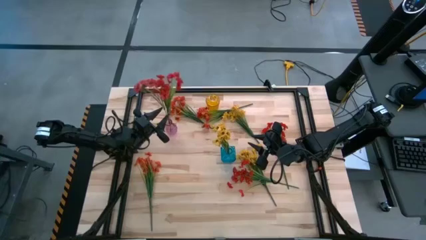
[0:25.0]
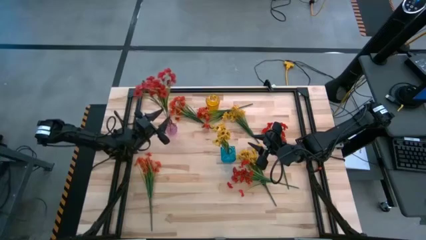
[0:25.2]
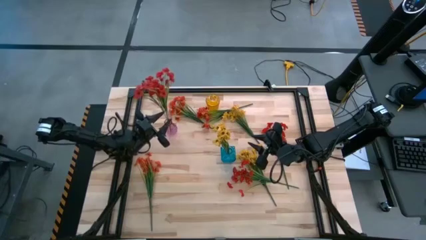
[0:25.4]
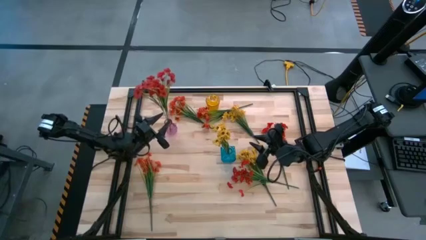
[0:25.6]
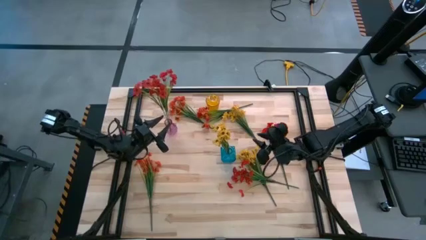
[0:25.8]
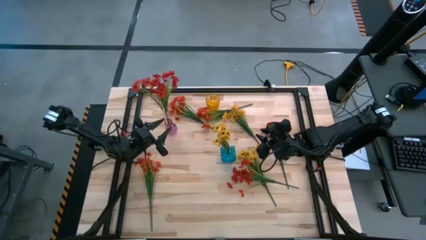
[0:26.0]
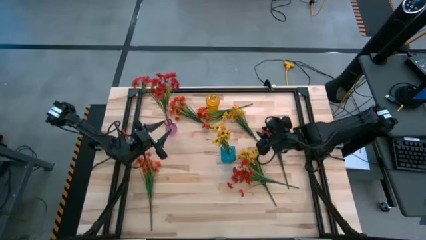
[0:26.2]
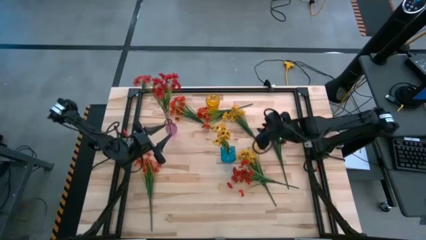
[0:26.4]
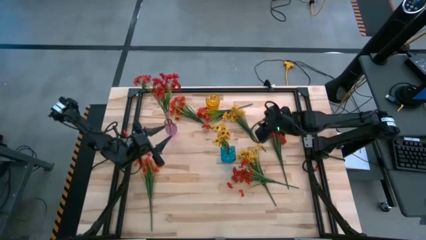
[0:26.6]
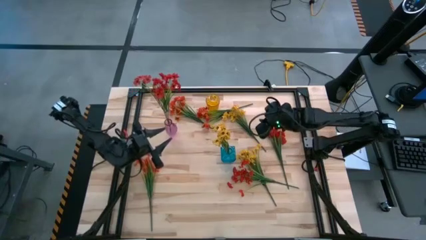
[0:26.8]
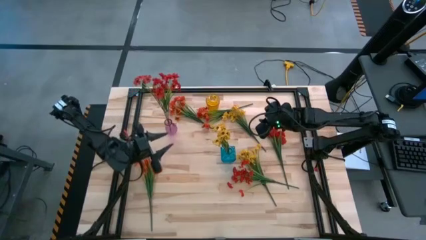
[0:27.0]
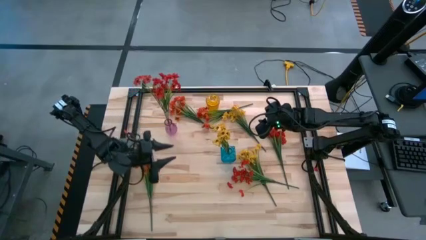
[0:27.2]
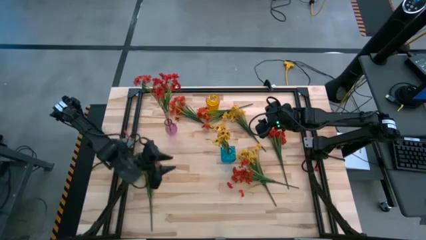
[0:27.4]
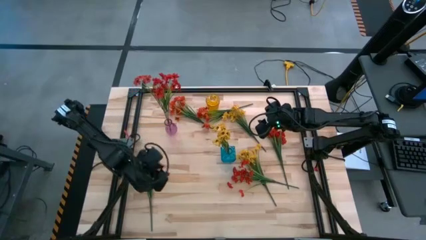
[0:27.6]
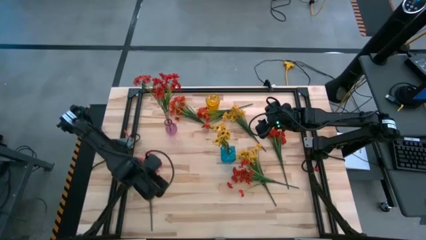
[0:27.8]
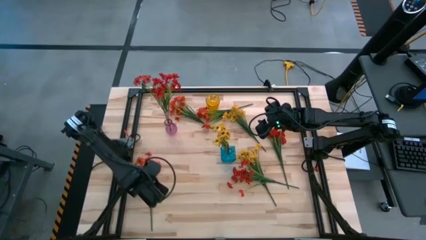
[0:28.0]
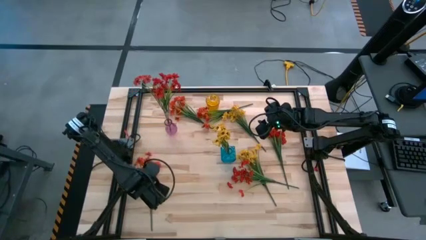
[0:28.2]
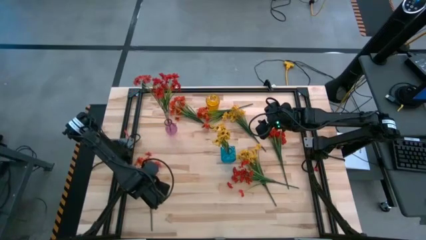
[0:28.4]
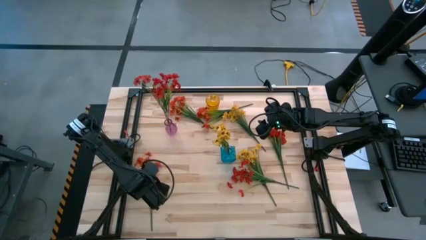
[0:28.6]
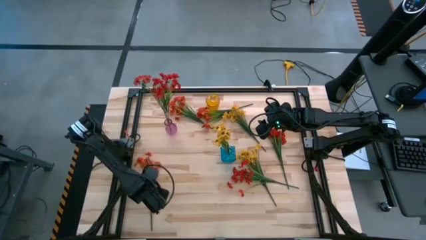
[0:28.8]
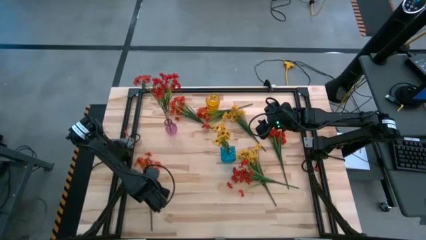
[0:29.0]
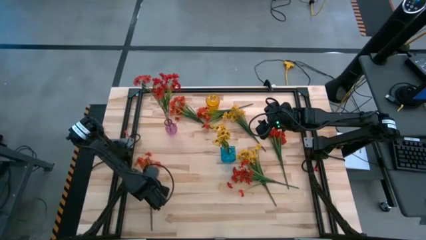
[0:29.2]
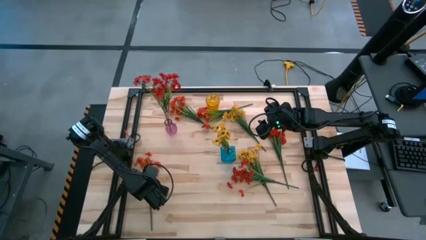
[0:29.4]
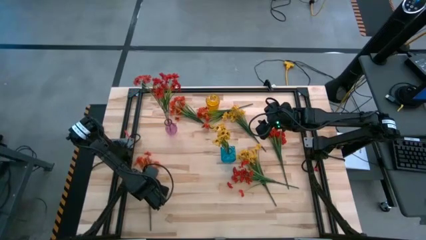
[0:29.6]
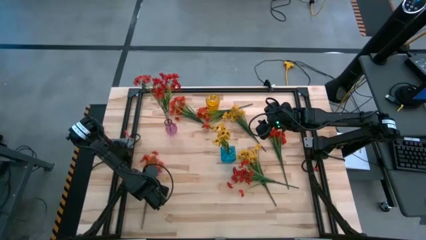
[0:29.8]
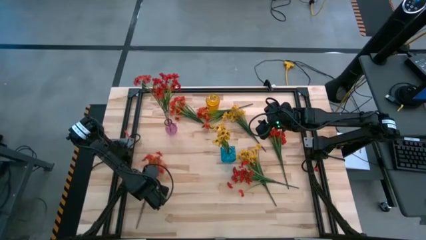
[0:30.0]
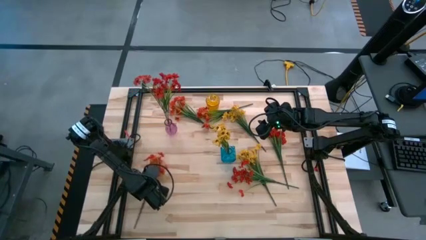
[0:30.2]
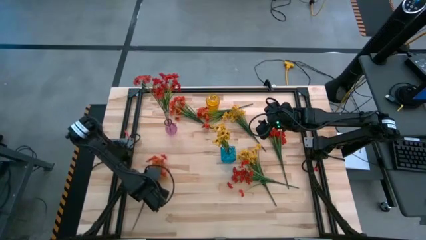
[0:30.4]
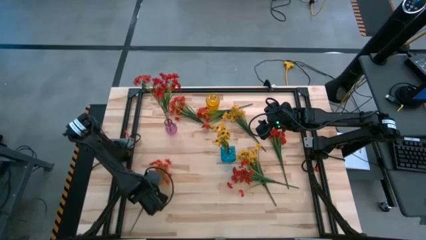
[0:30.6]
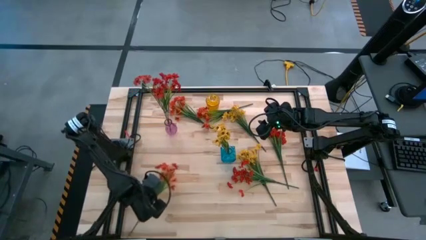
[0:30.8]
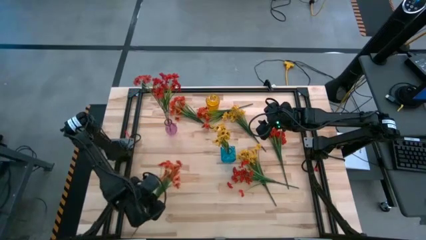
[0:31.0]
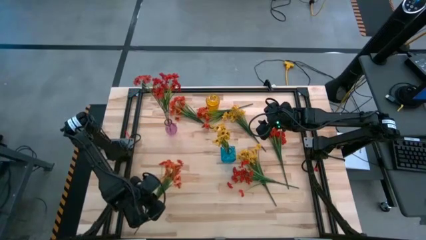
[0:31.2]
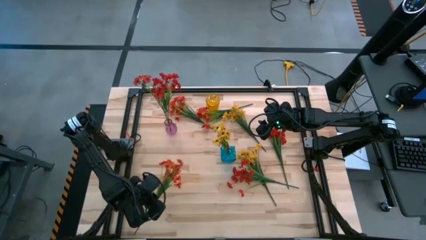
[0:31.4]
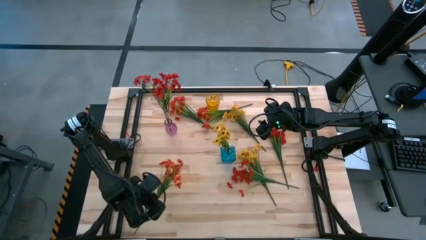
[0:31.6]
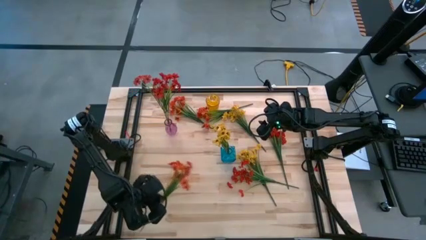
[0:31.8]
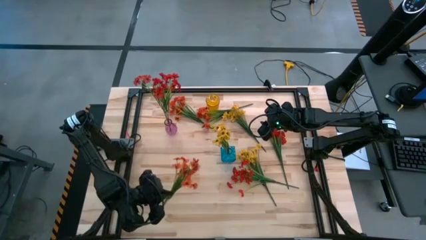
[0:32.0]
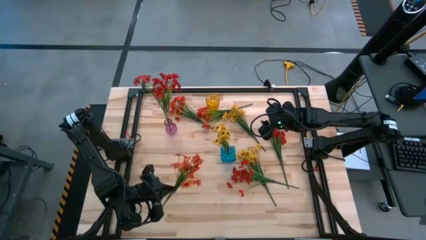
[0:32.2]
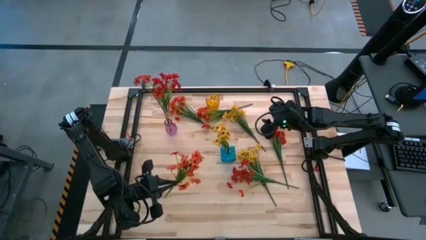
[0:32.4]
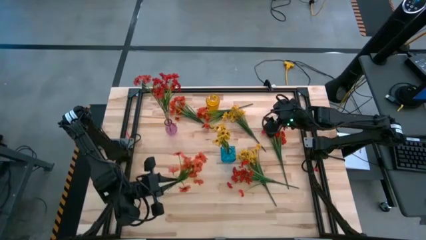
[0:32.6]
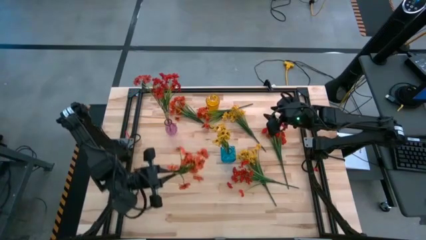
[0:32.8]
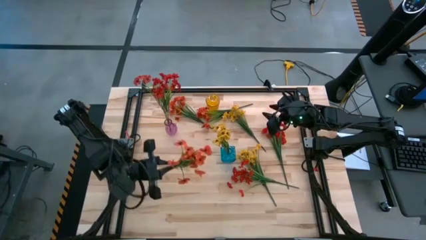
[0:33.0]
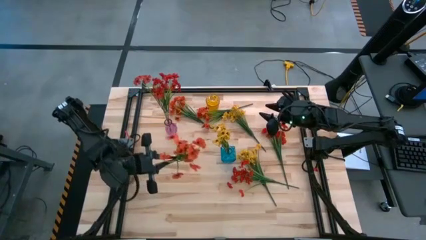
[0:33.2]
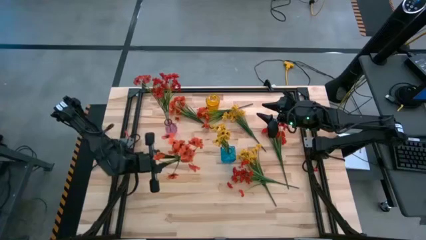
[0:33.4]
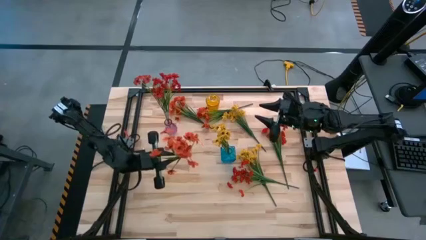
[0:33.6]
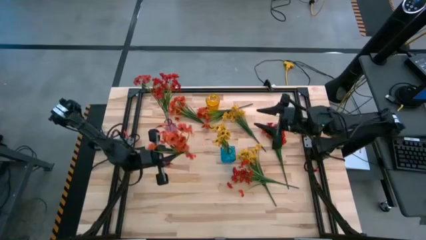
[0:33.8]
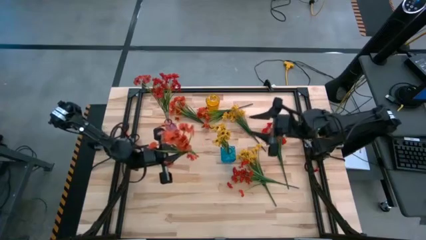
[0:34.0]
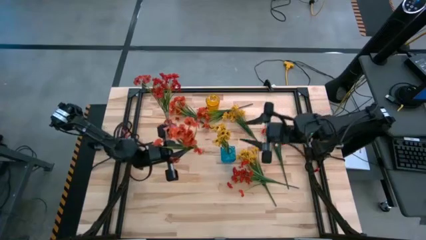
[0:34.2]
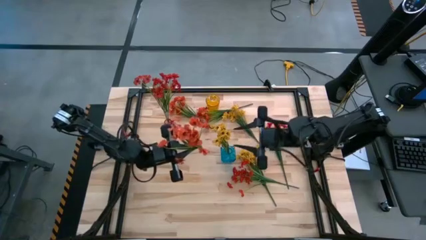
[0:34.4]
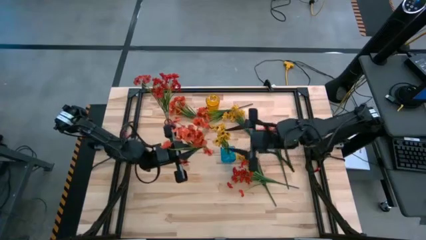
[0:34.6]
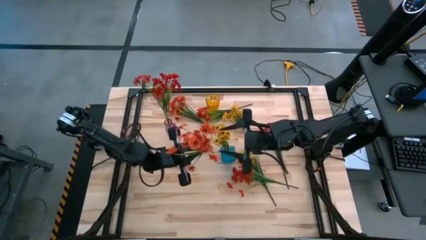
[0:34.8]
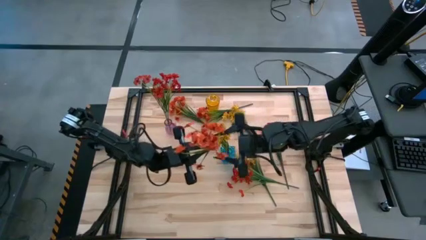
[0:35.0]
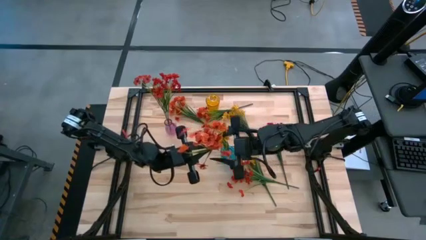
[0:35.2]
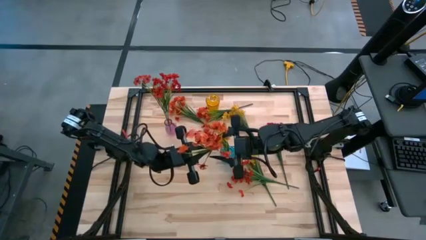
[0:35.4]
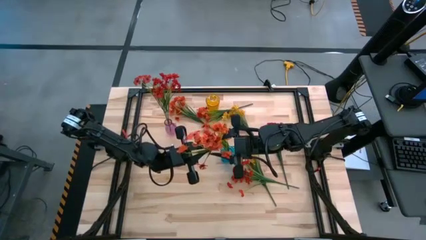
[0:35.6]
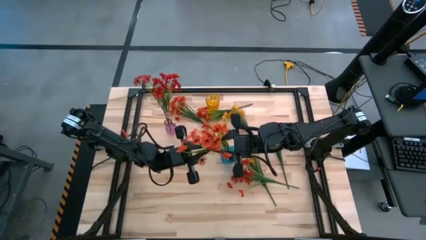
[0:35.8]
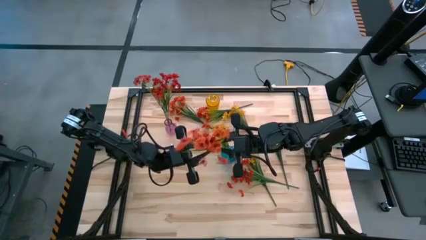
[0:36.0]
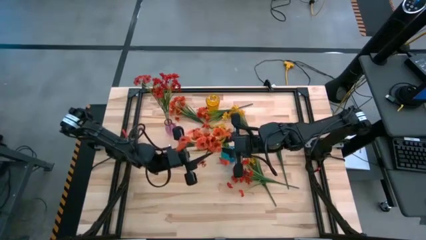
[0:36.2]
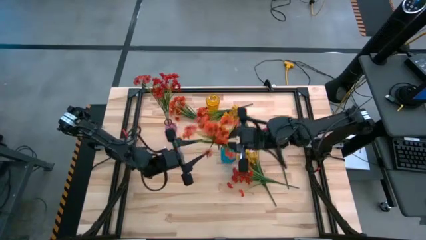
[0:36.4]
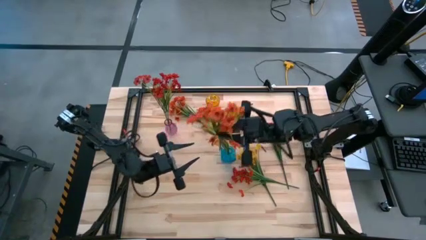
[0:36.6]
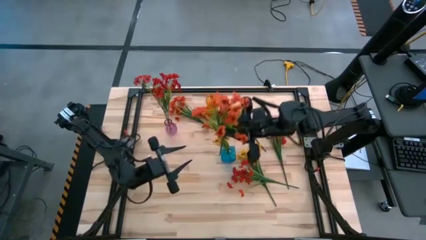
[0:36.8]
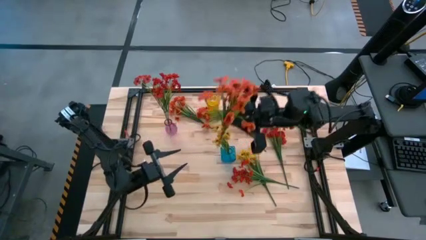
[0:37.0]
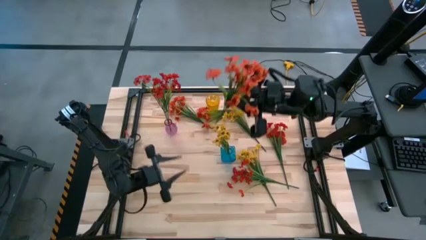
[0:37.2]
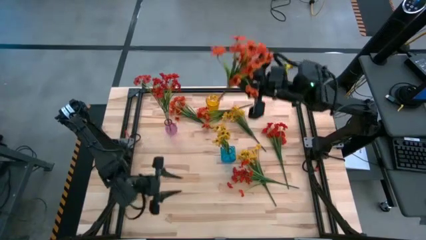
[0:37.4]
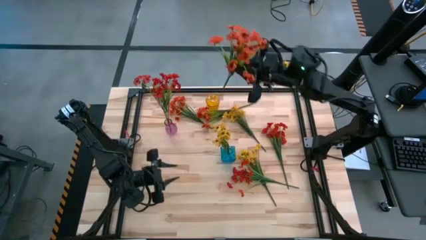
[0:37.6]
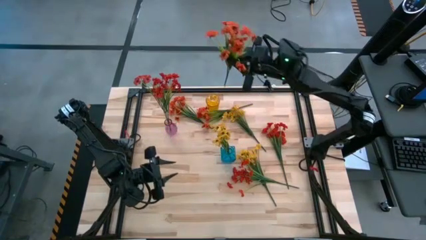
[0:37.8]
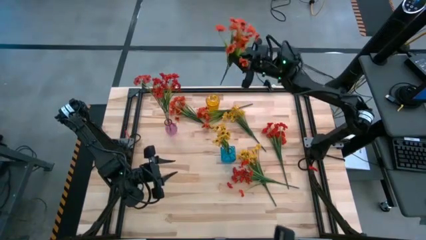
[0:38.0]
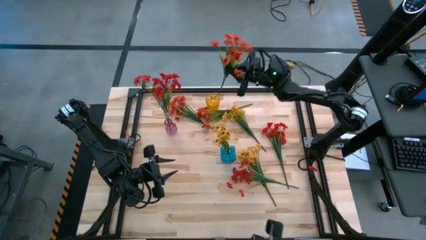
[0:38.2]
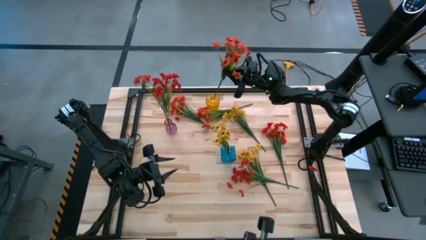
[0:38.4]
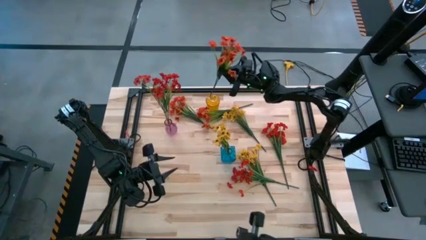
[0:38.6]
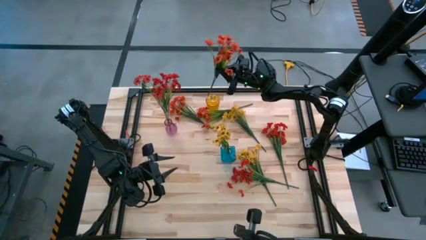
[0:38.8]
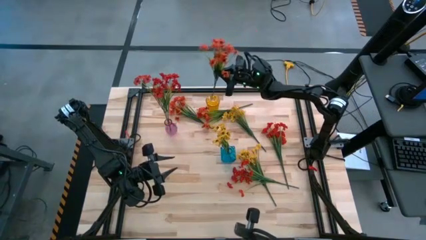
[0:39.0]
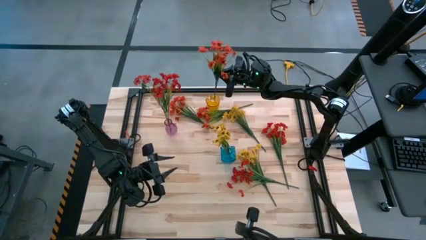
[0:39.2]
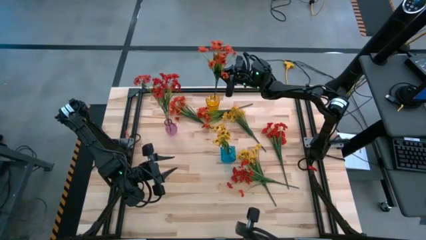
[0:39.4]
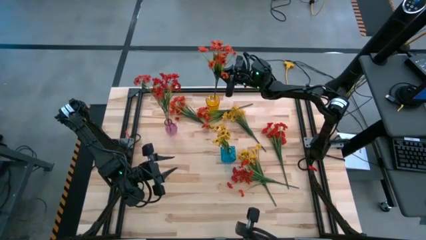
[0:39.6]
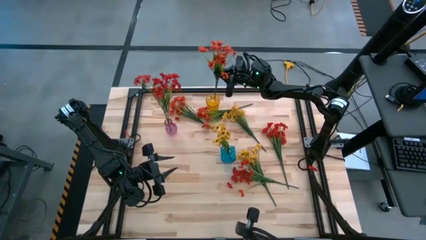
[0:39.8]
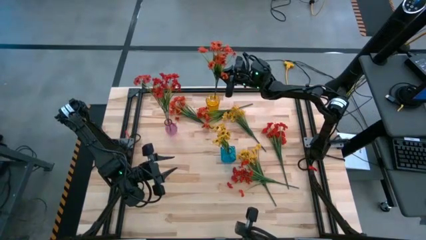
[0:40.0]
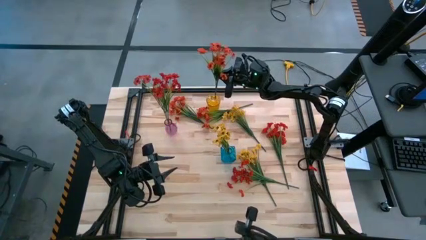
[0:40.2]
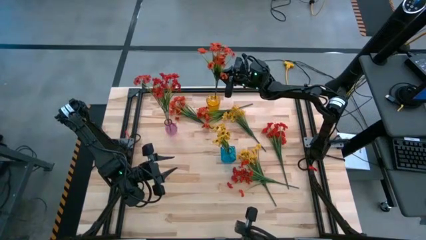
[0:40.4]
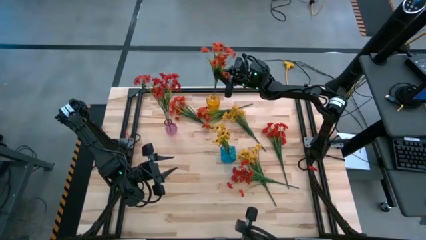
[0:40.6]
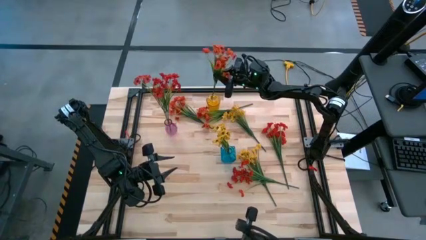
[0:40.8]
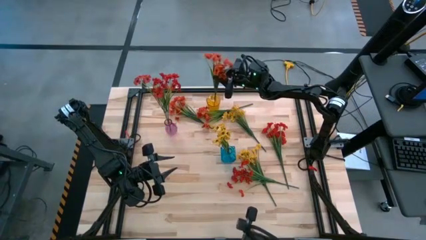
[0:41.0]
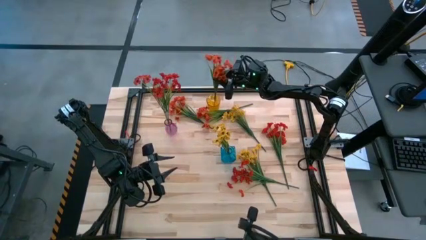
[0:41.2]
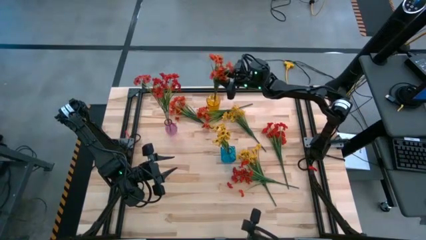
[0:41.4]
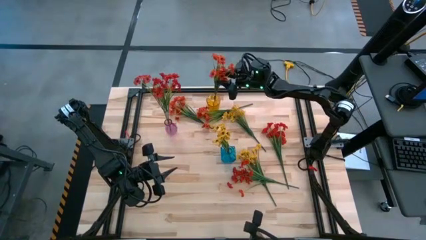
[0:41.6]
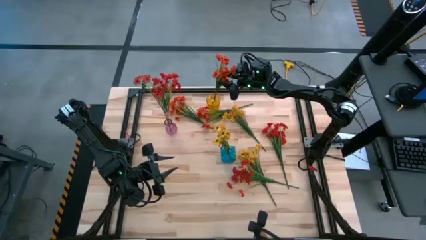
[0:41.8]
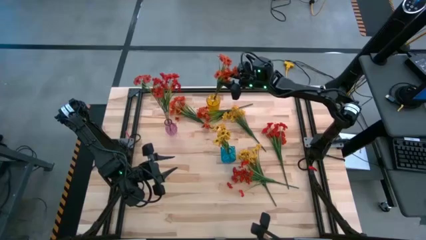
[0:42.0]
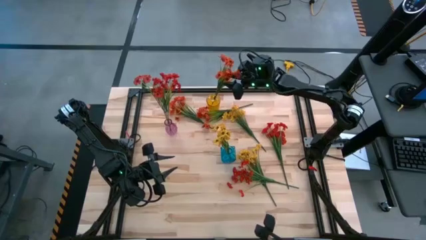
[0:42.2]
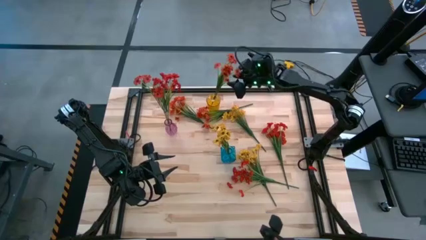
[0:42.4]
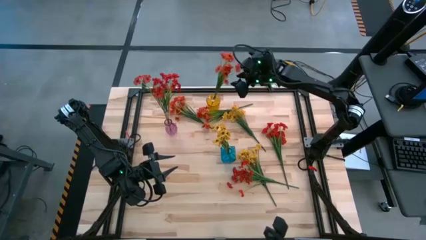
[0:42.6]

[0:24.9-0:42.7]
Task: Sort flowers into vase by color
Put the bottom orange flowers into the yellow vase
